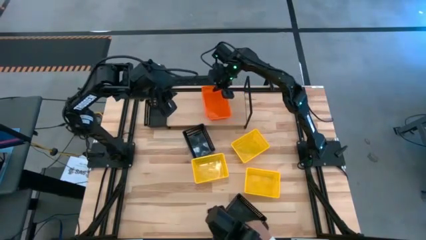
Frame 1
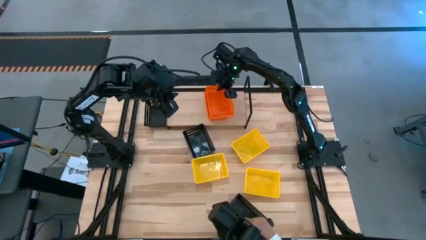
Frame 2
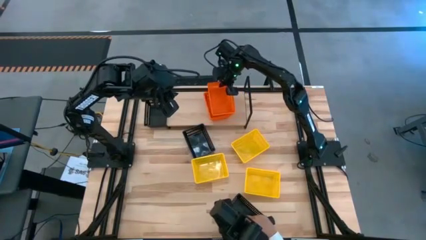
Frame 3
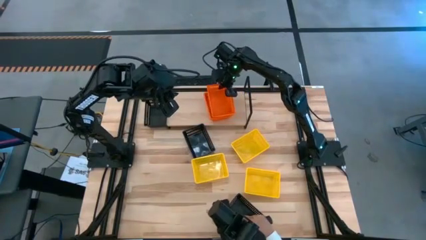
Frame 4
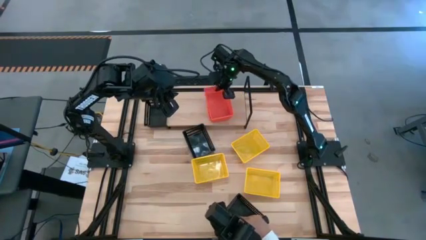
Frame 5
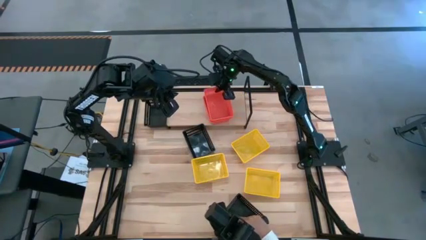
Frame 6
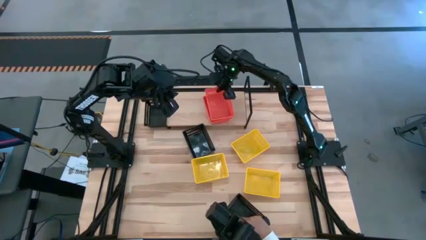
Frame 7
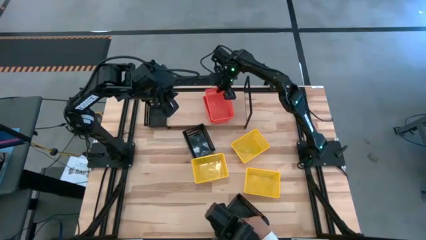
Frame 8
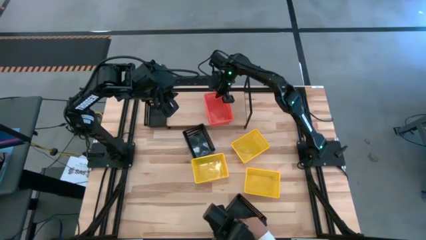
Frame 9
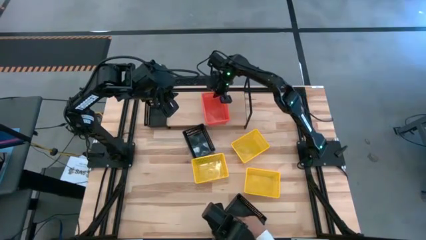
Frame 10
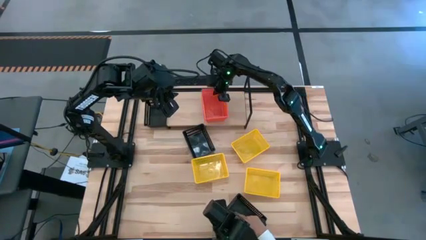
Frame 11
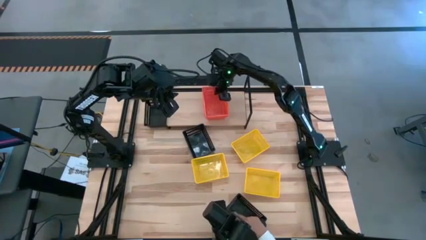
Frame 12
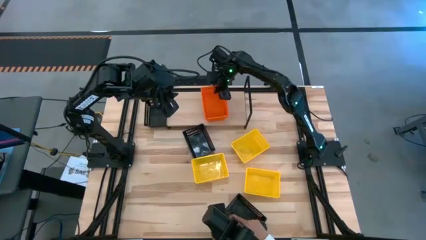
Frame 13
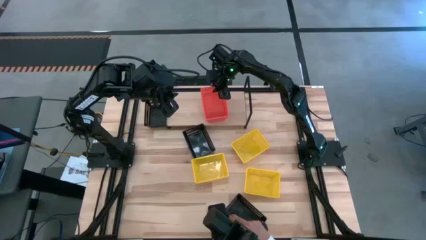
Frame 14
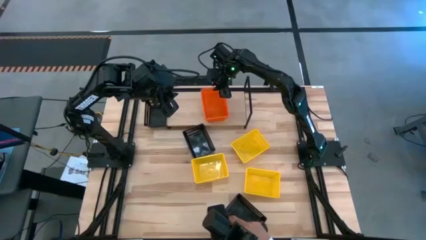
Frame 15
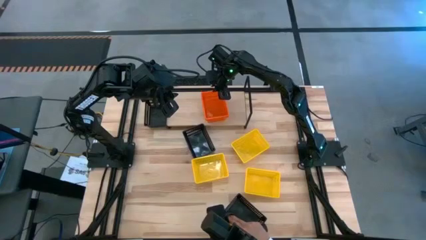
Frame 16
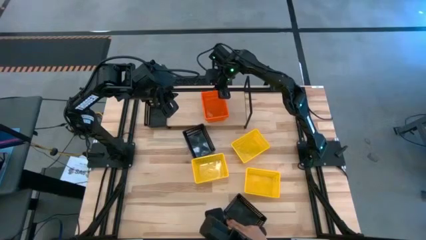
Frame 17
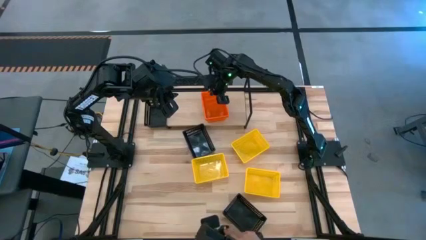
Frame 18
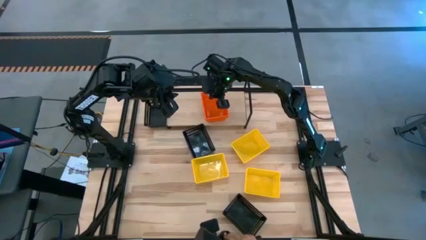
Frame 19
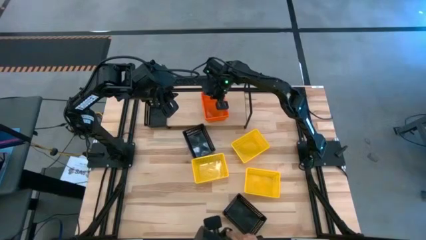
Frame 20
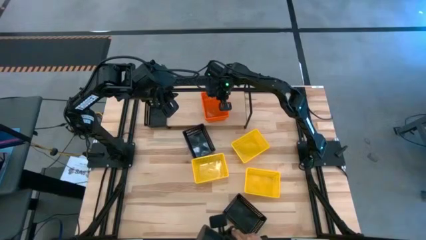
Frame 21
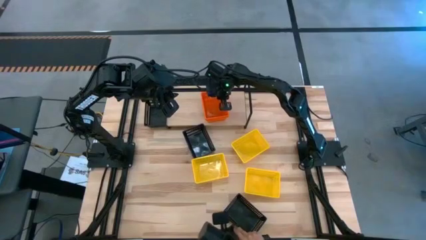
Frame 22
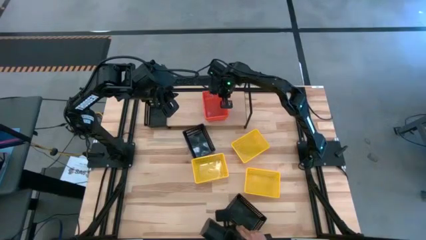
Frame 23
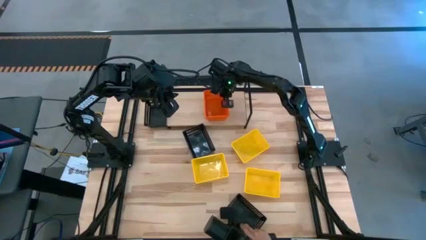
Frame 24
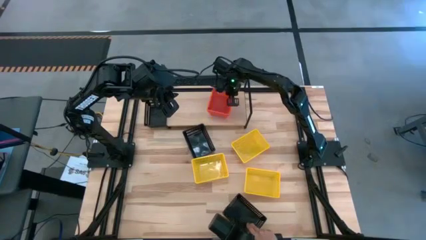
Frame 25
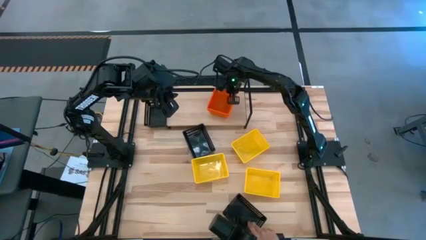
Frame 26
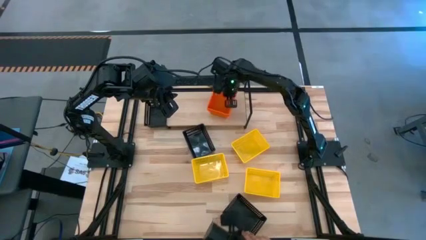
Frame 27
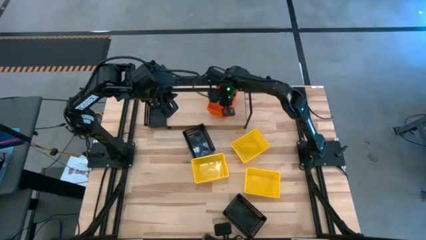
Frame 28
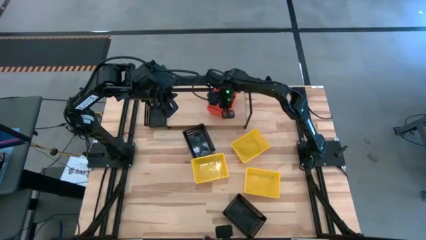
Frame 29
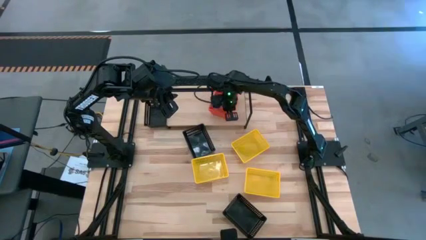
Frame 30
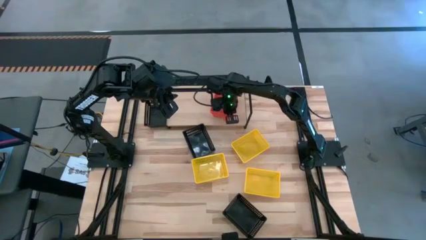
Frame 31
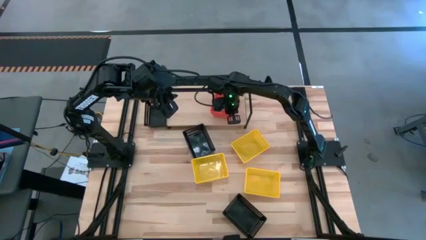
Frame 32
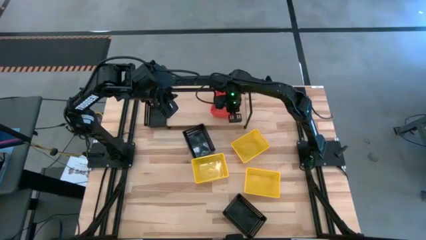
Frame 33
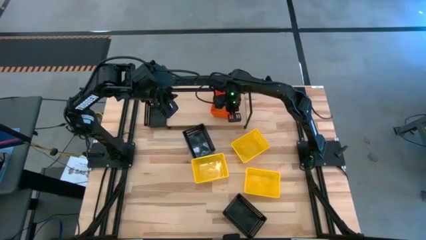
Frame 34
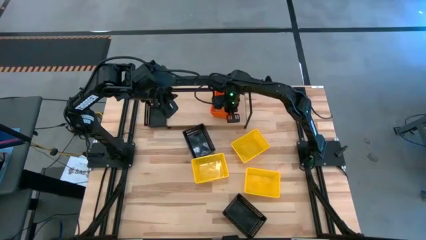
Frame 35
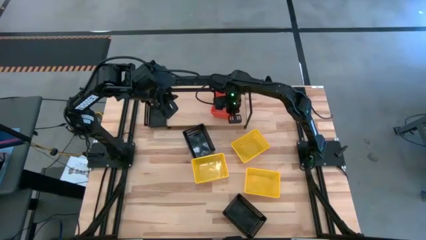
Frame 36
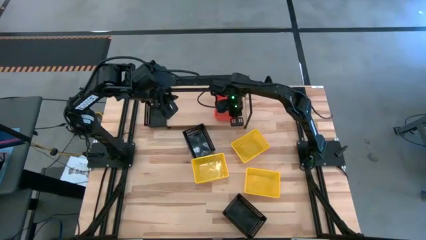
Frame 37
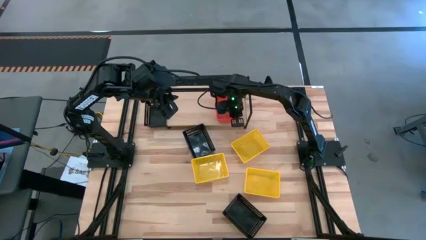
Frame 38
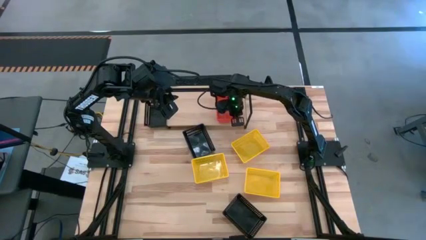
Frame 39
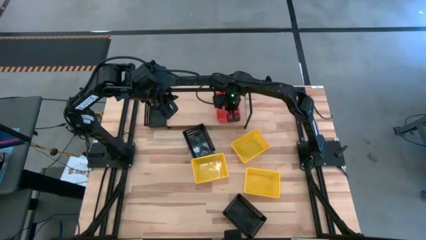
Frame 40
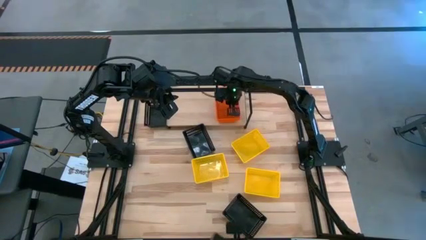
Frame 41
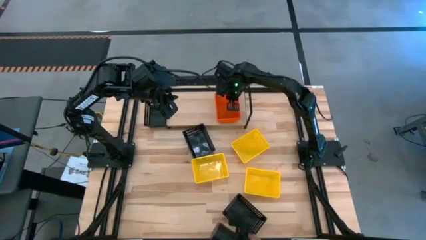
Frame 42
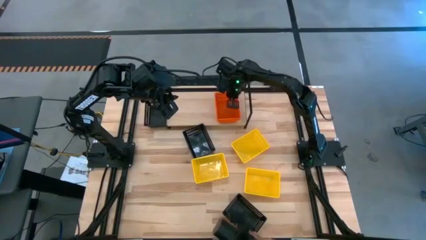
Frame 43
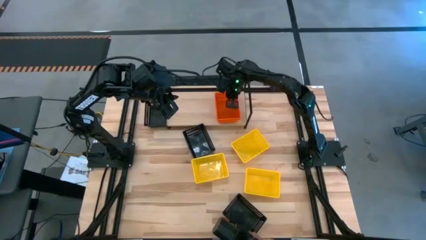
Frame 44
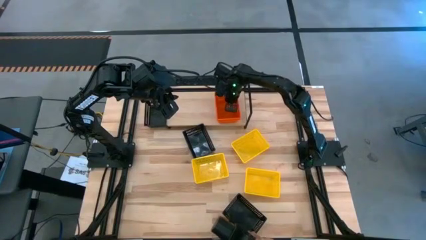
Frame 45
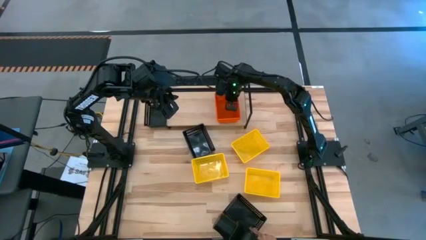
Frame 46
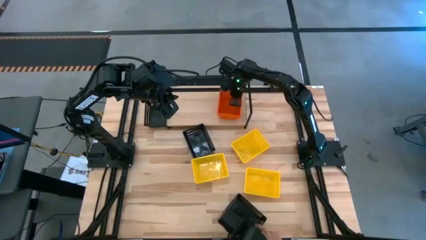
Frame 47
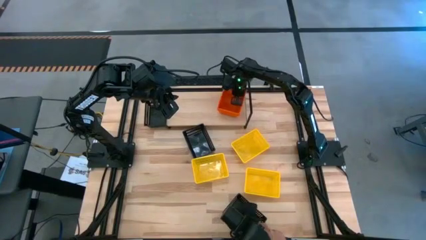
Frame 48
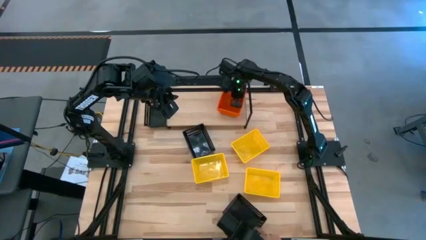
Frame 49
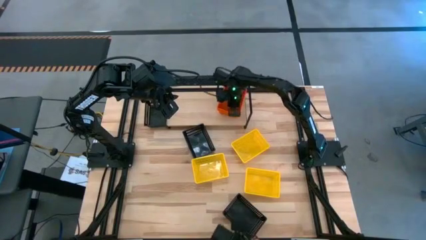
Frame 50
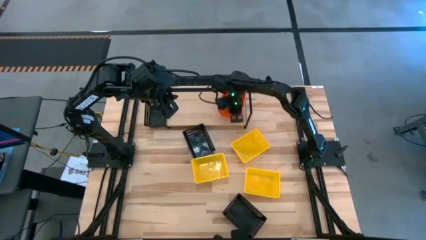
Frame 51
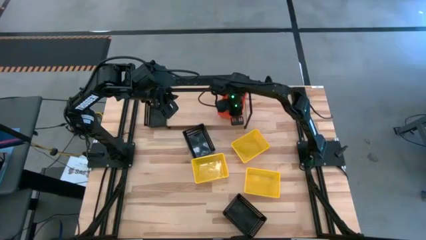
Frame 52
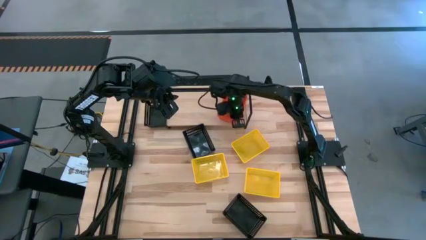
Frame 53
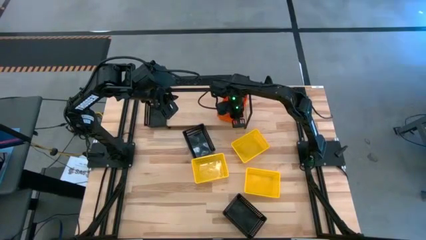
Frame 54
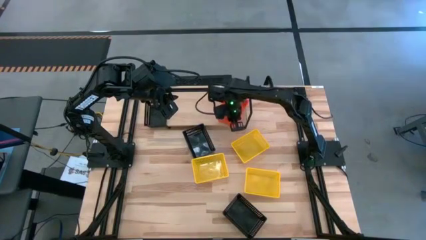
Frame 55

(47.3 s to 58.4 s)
Task: Stack baskets on shelf by color
Stack the orange bin on top of the orange bins on the shelf

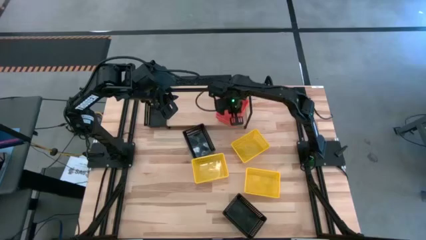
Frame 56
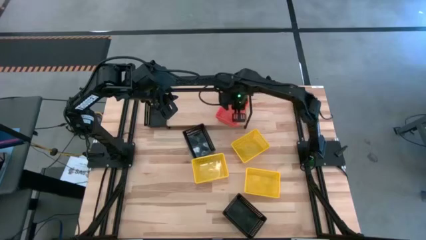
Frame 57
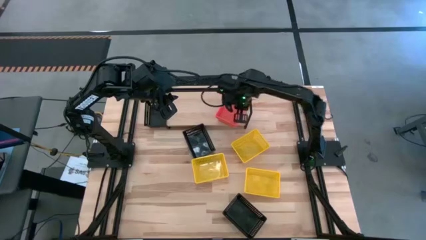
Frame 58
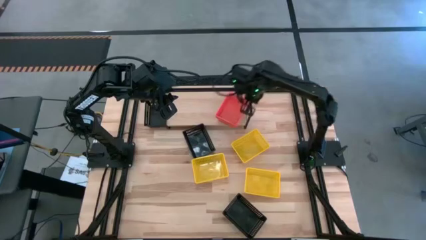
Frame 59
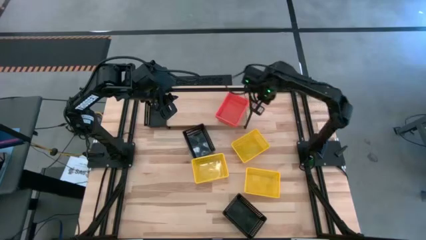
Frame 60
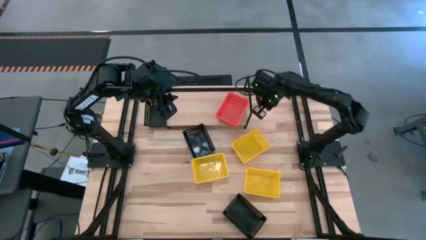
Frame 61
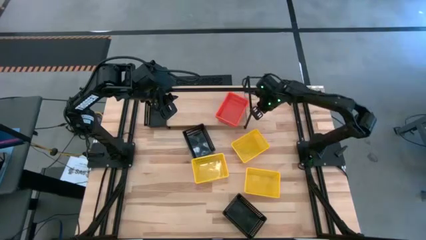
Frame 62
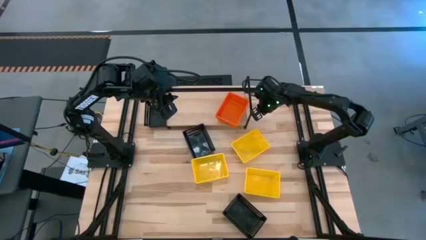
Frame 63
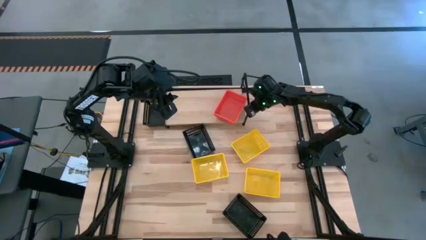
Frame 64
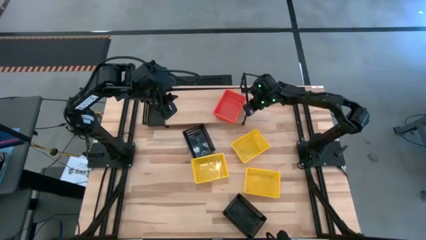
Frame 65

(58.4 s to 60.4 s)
Adjust the shelf
